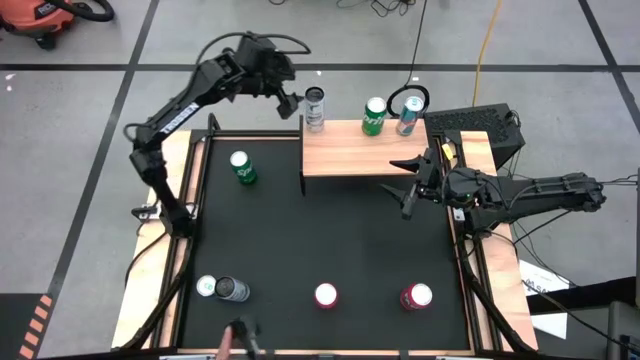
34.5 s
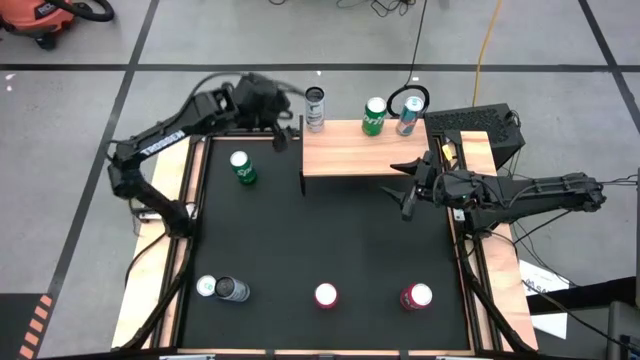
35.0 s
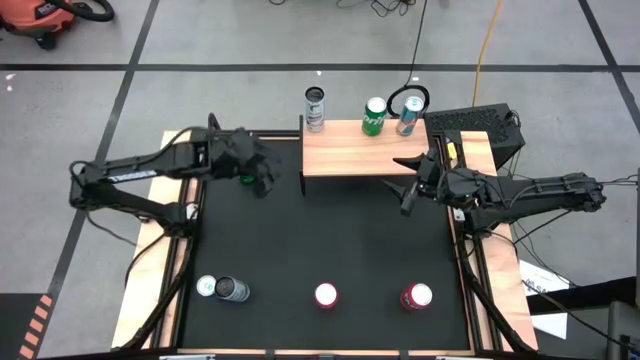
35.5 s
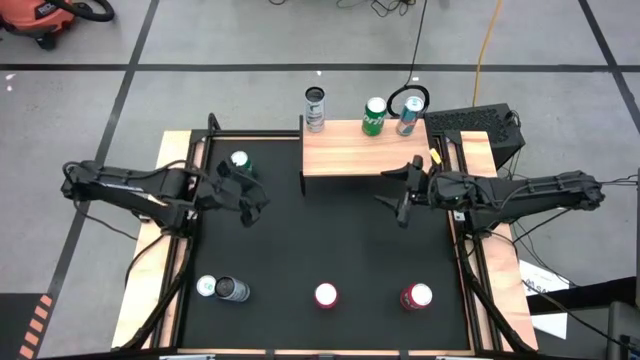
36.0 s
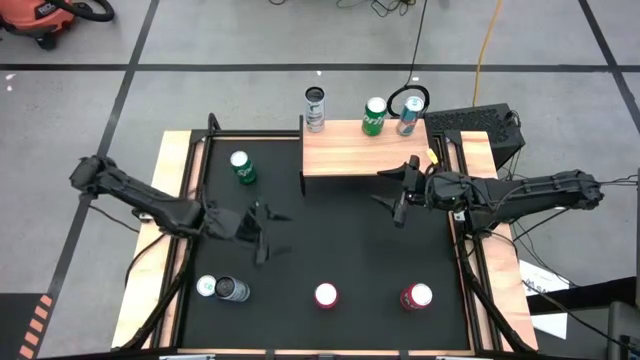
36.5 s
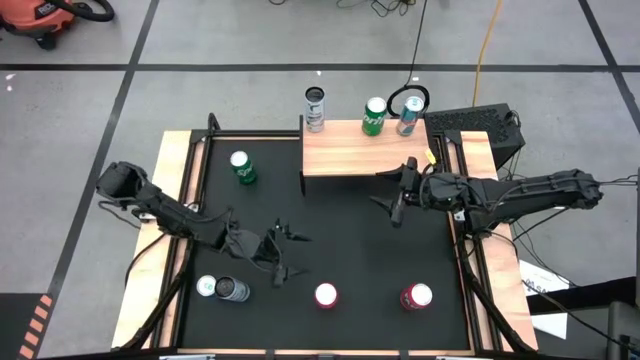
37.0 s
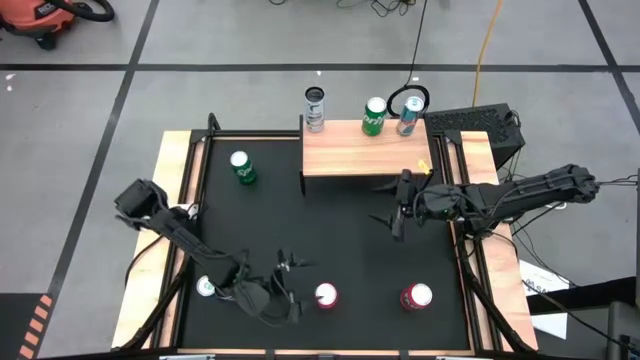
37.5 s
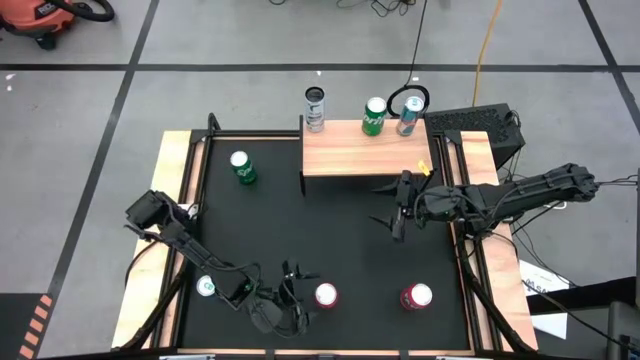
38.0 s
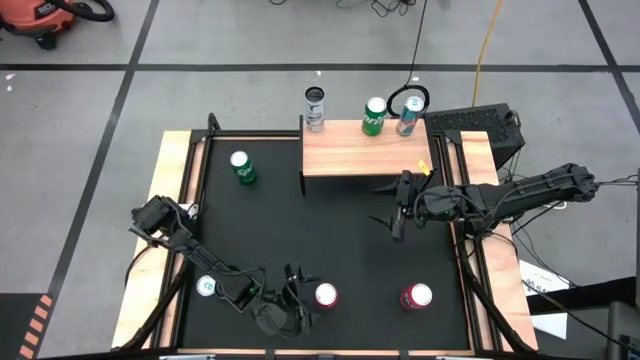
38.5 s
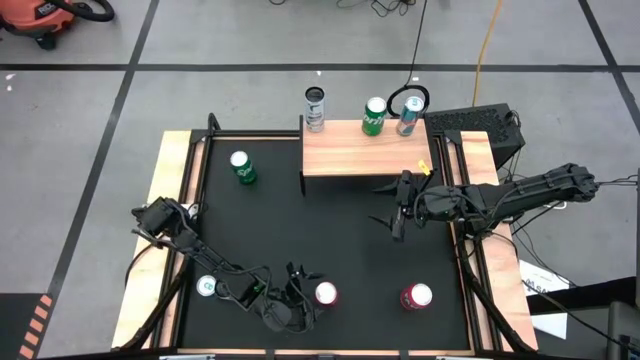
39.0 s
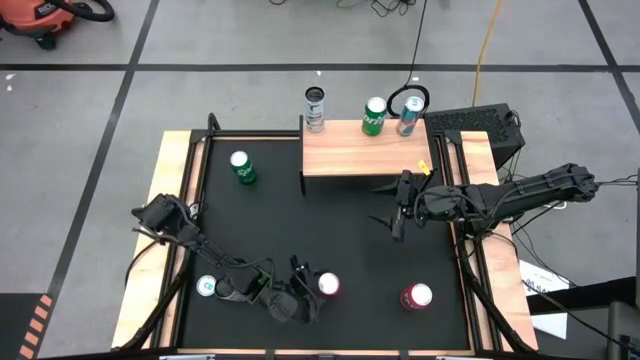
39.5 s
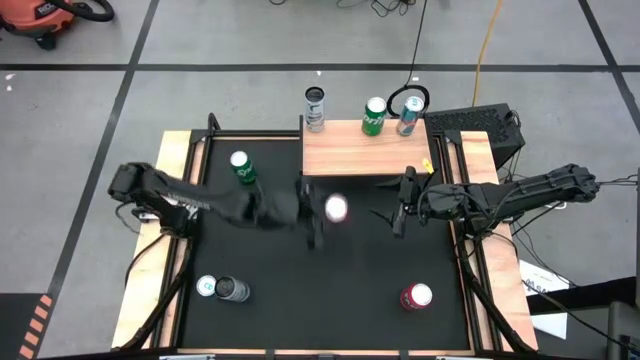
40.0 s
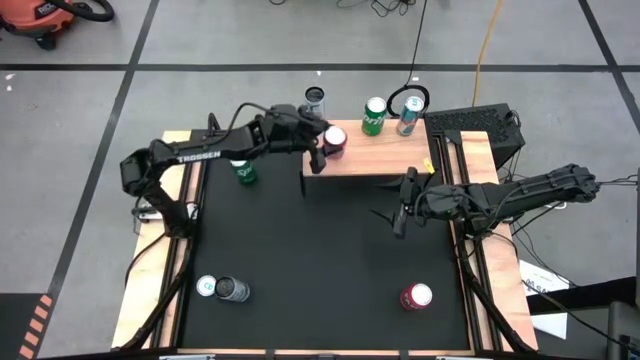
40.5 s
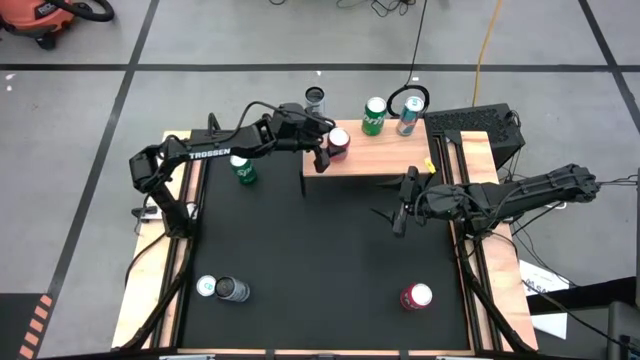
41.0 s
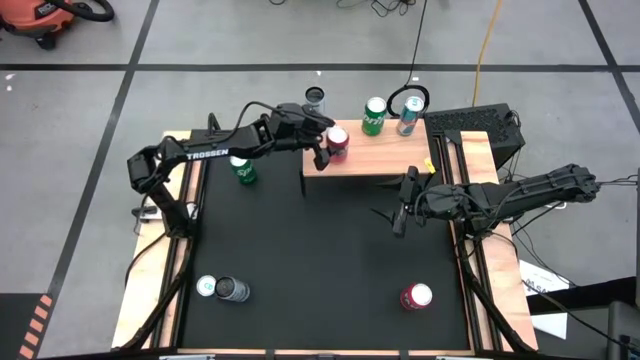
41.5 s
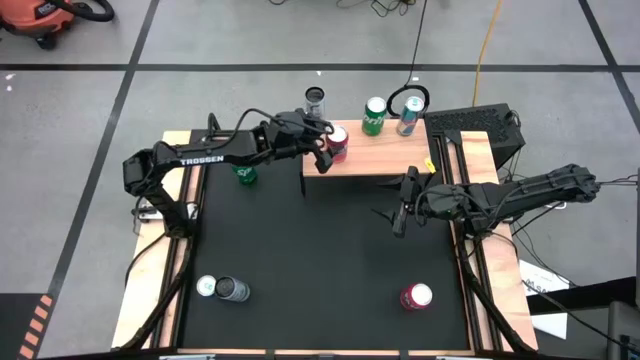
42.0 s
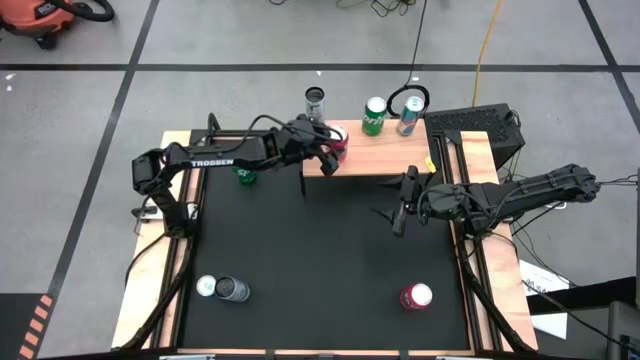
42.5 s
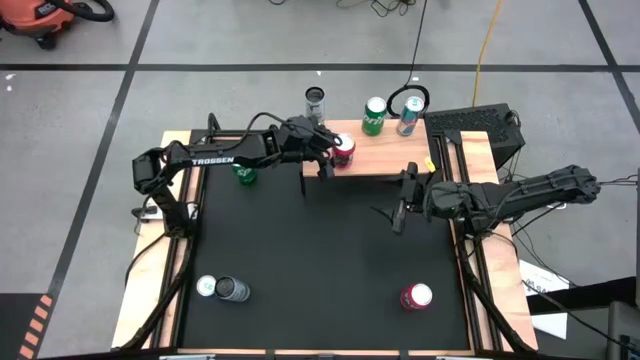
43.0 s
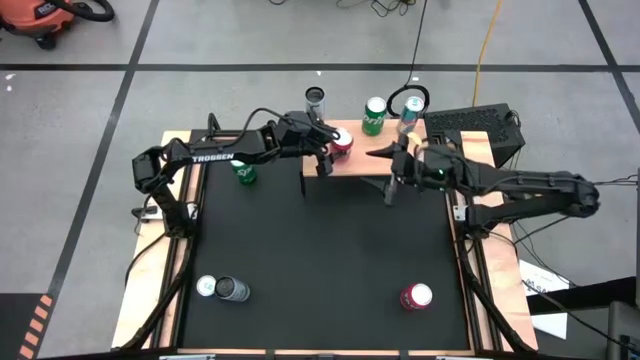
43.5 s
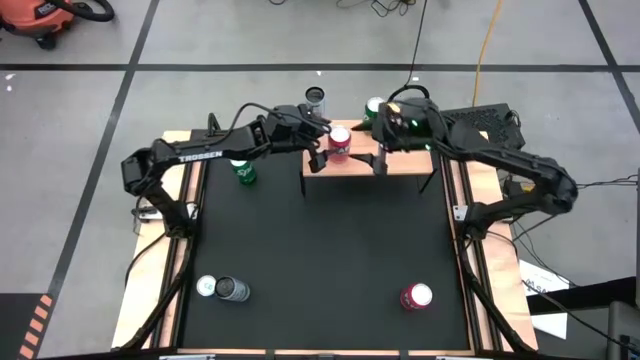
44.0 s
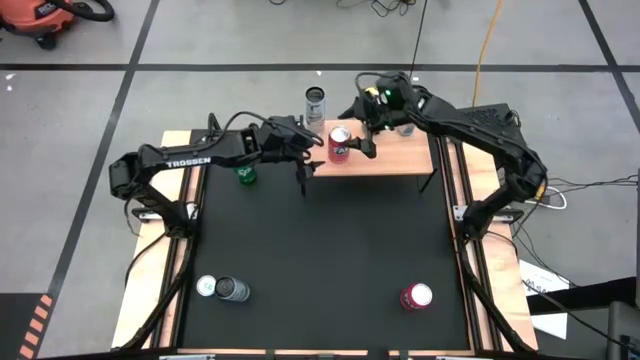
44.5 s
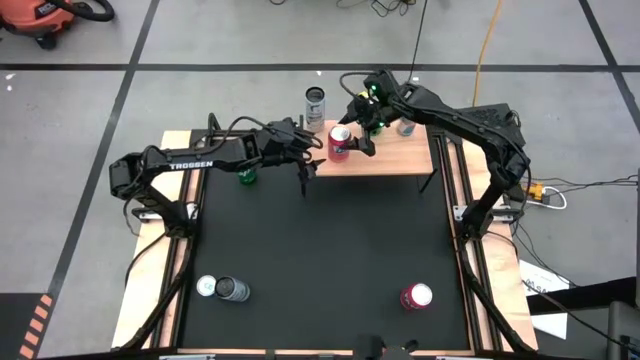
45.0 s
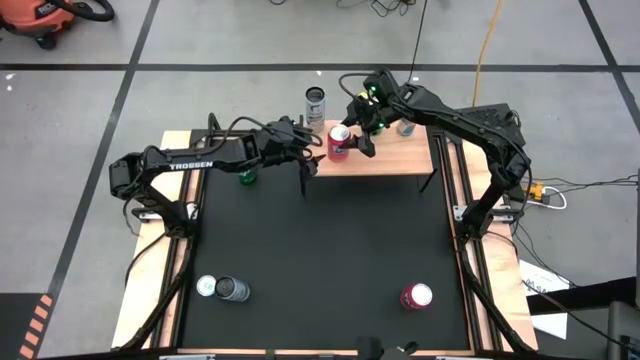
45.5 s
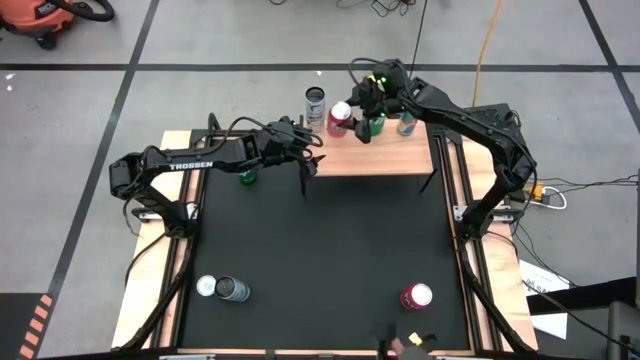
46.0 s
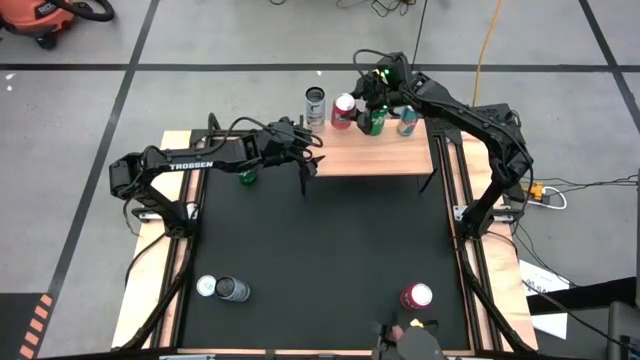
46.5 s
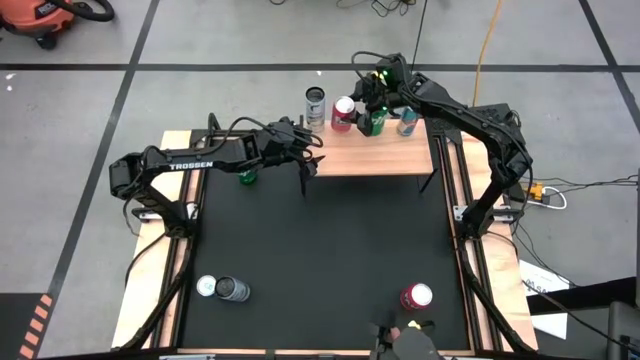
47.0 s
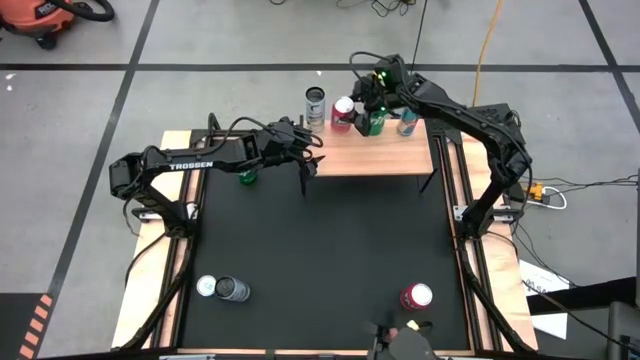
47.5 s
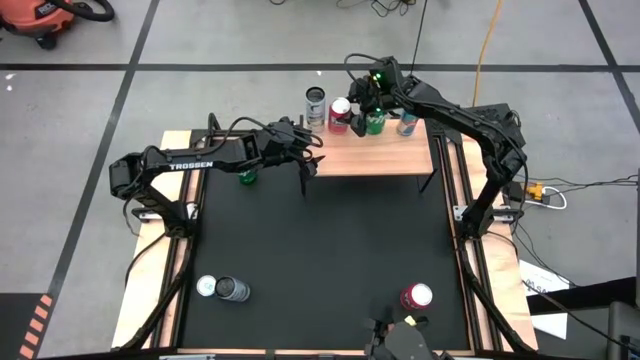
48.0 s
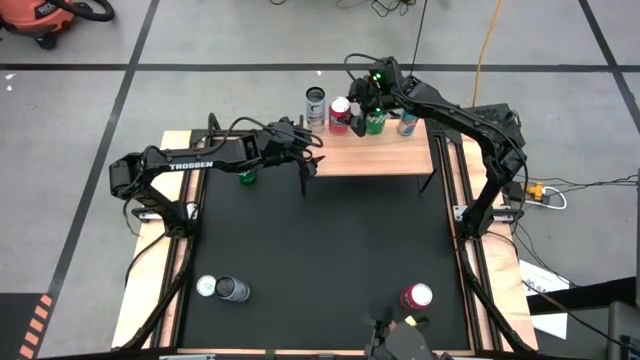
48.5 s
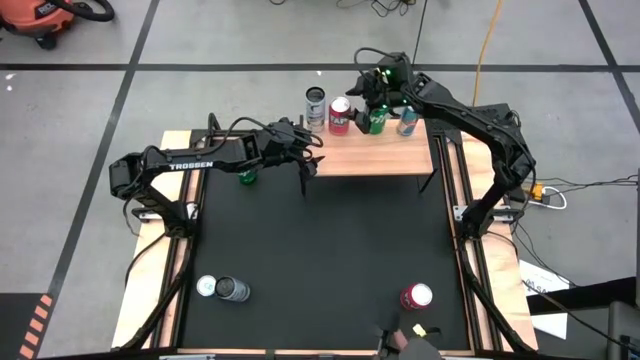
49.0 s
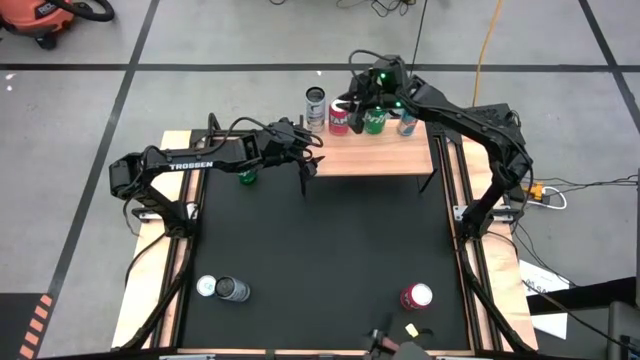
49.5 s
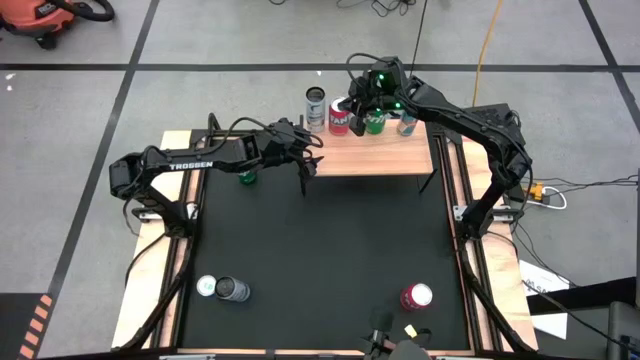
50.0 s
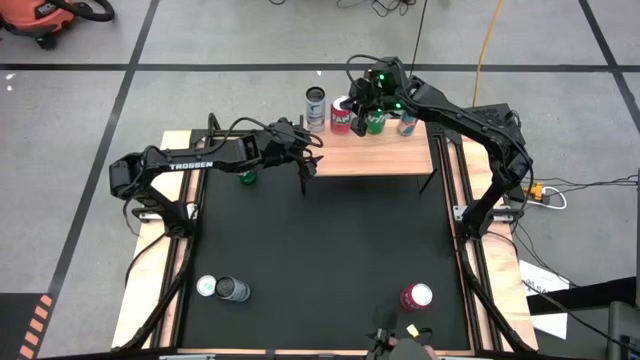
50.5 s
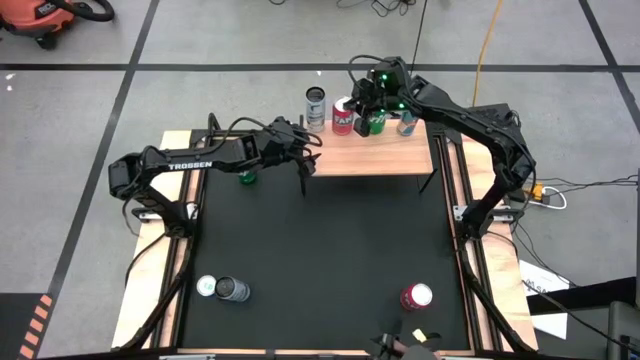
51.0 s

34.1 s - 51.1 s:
Task: Place canned beverage on shelf
Put the left orange soda can on the shelf

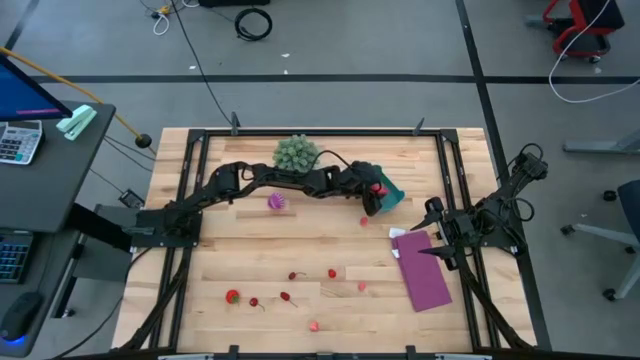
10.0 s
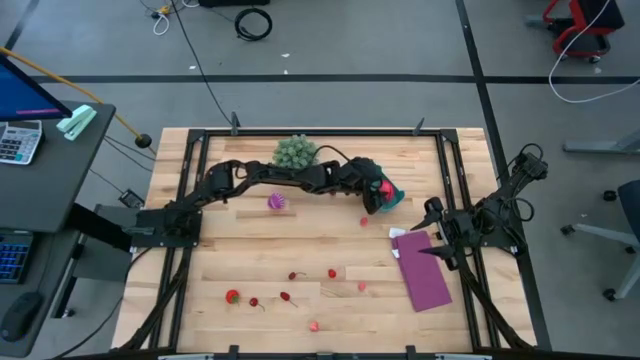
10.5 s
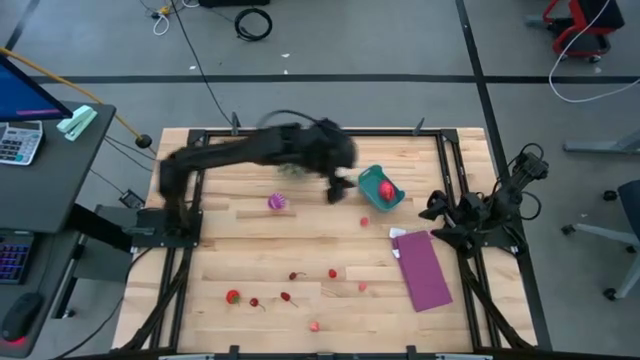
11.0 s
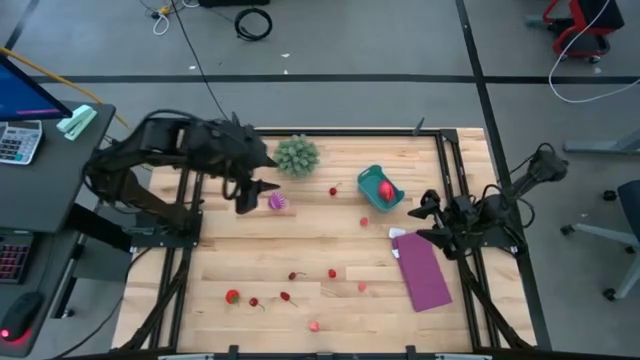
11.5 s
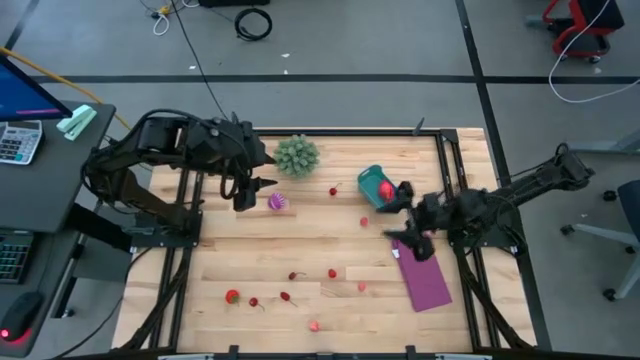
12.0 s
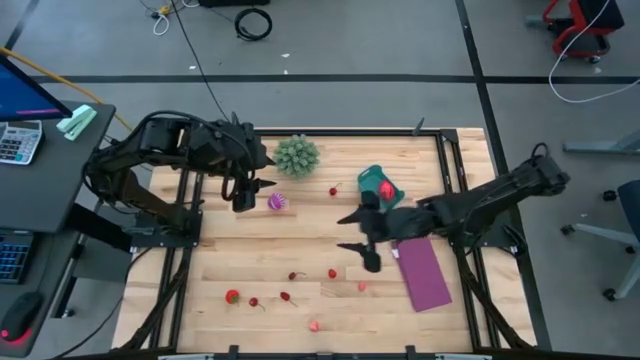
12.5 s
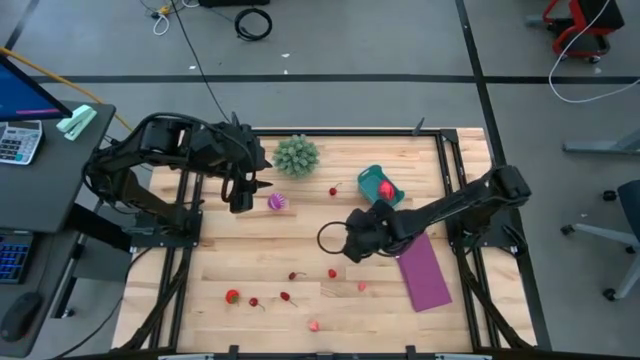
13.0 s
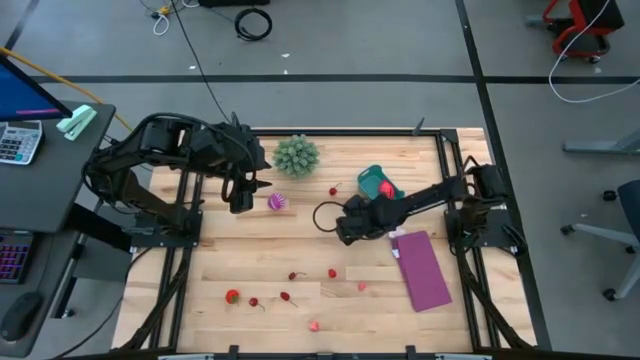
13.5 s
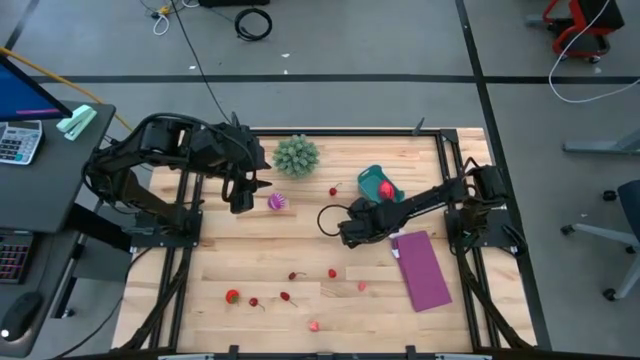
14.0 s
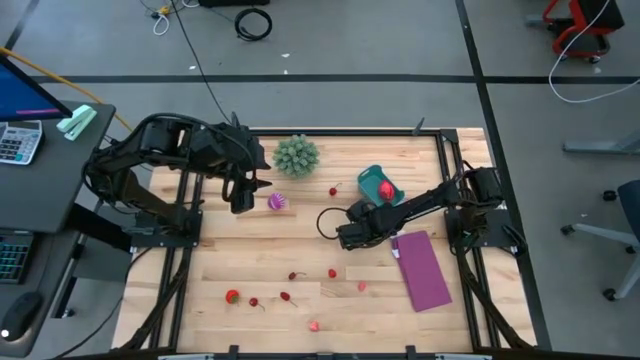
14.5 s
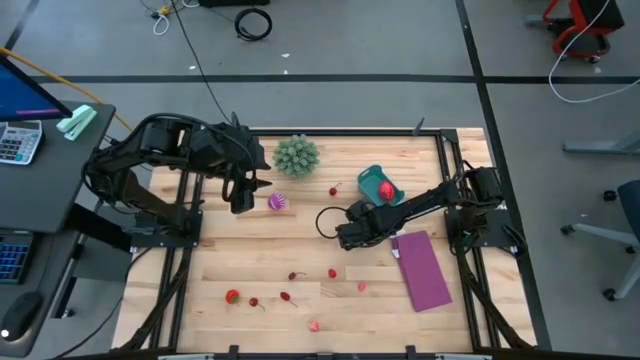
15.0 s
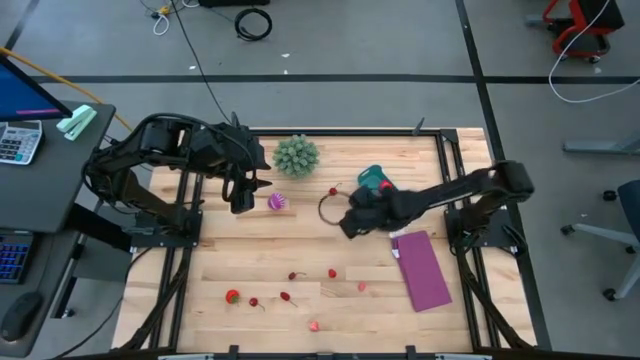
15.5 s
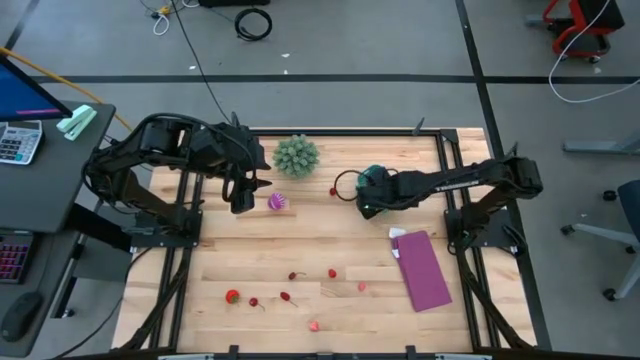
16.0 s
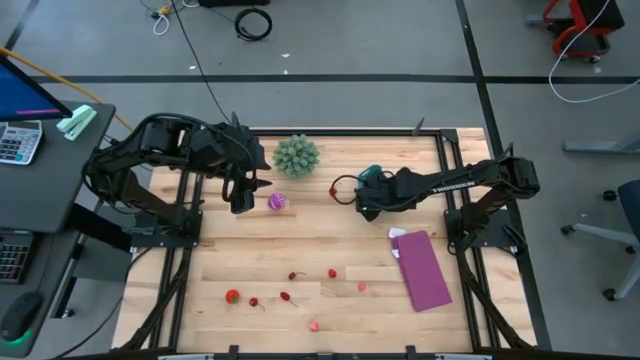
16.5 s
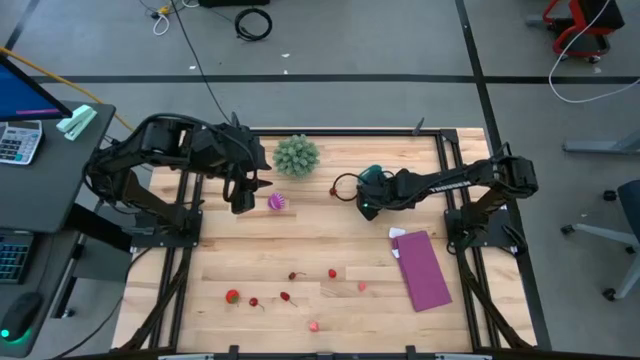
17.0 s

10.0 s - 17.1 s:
Task: Pick and placing Produce into tupperware
Put the pink peach into the blue bin
